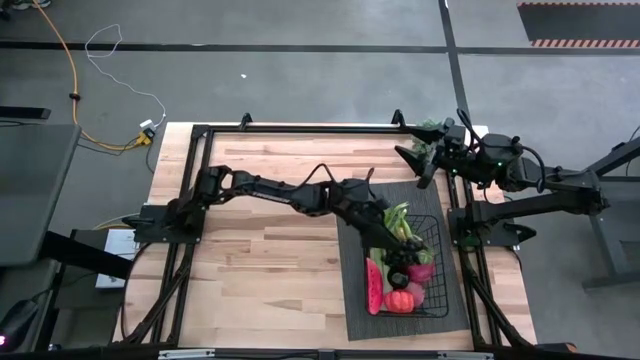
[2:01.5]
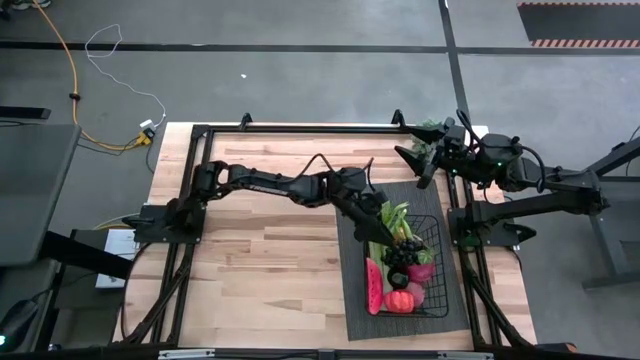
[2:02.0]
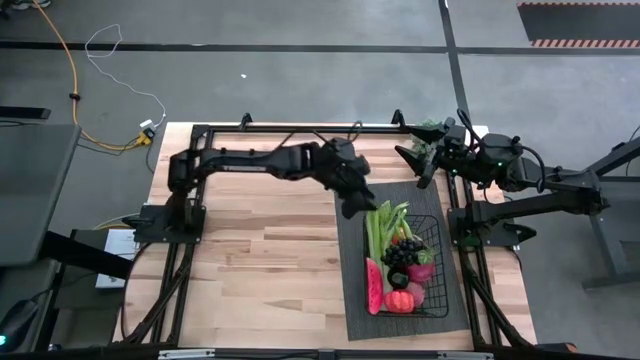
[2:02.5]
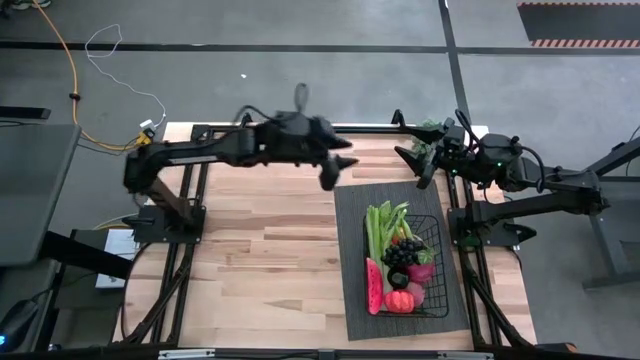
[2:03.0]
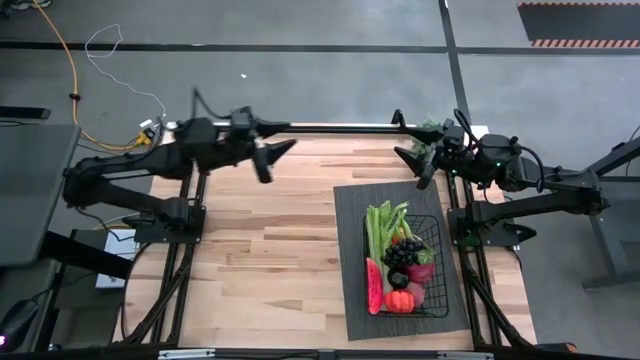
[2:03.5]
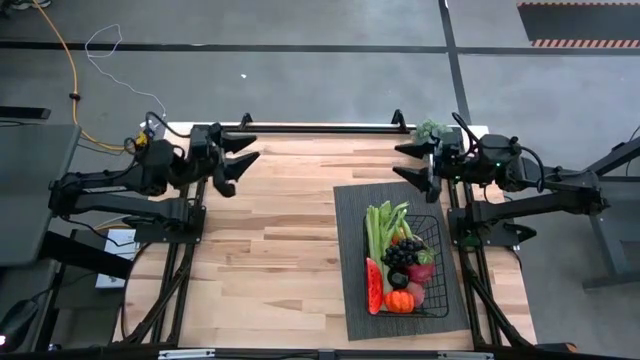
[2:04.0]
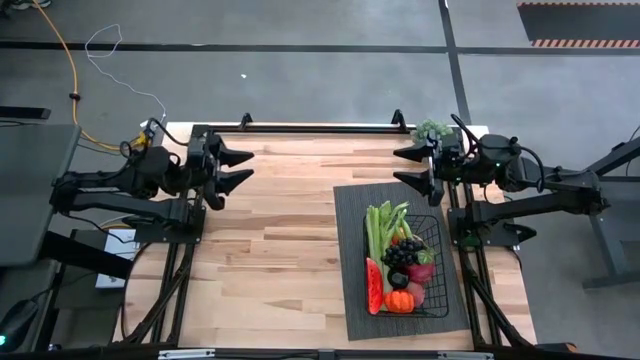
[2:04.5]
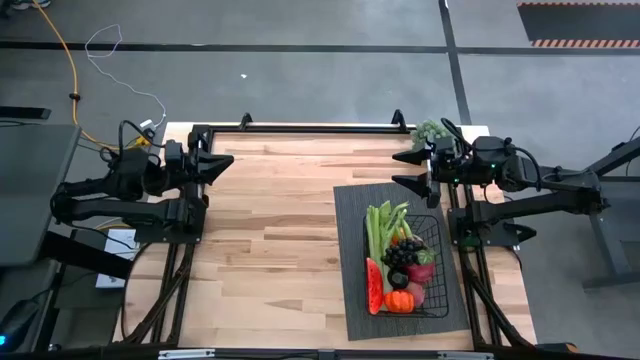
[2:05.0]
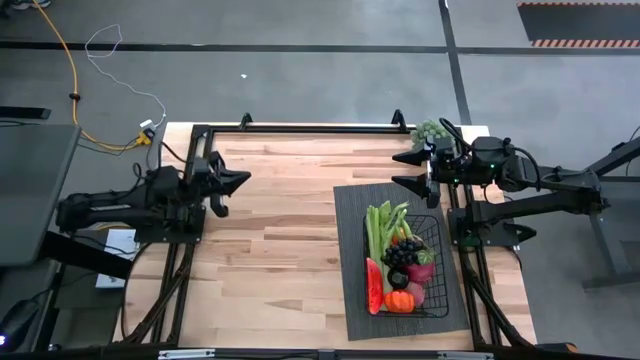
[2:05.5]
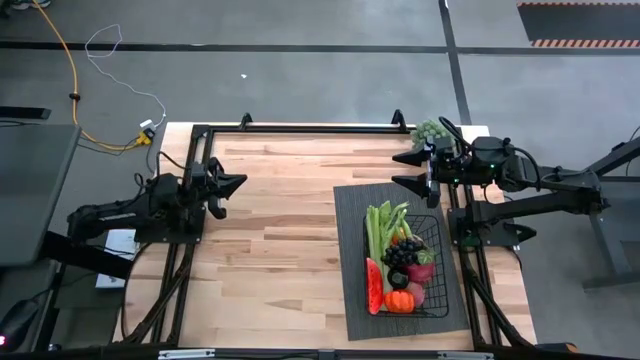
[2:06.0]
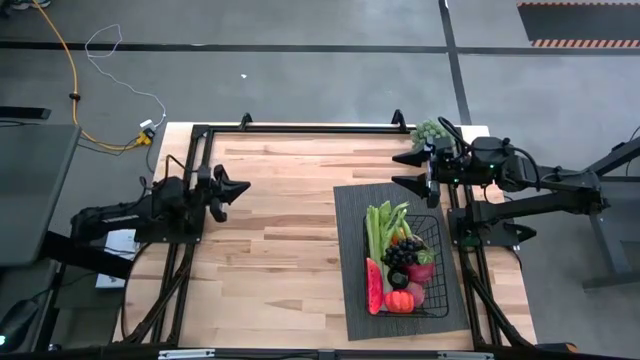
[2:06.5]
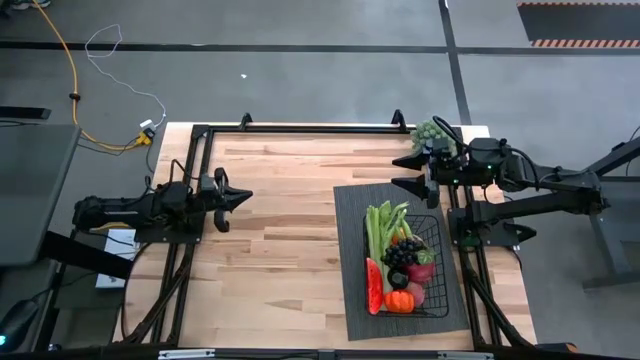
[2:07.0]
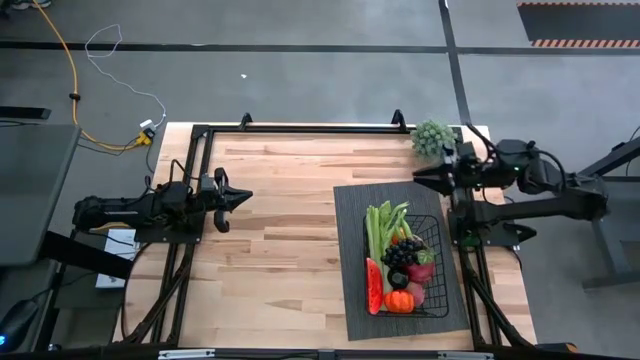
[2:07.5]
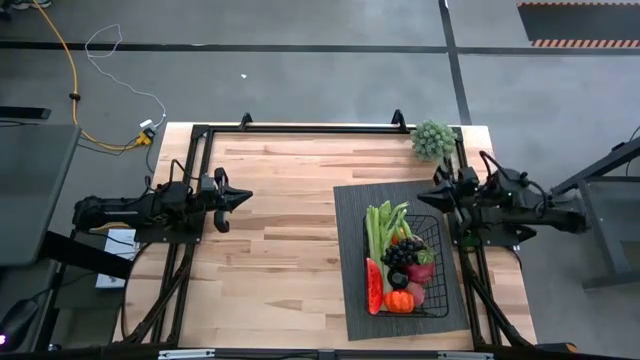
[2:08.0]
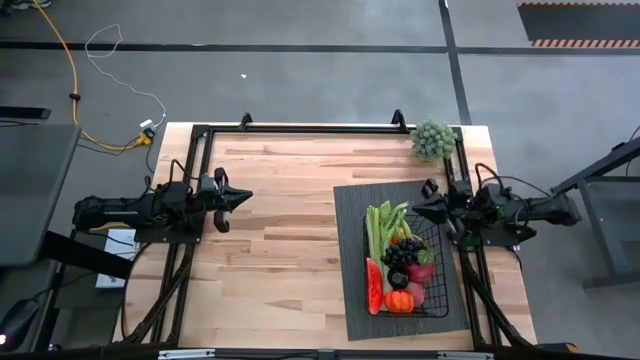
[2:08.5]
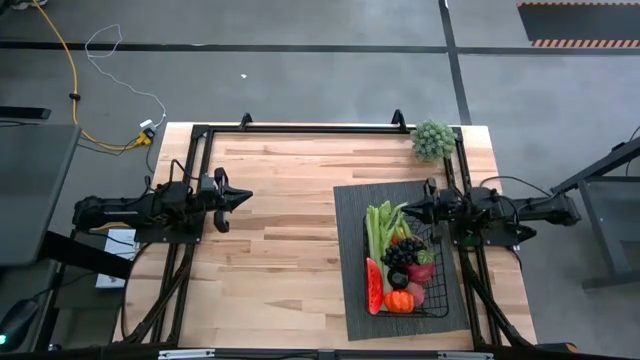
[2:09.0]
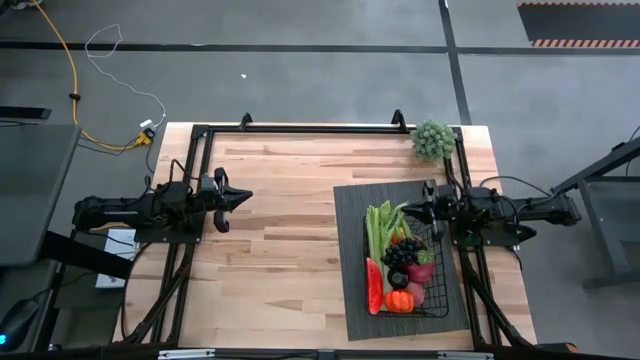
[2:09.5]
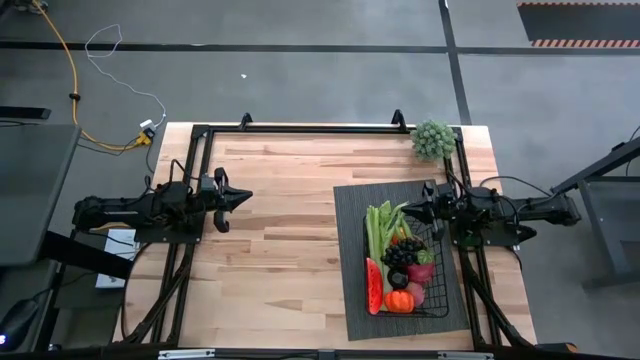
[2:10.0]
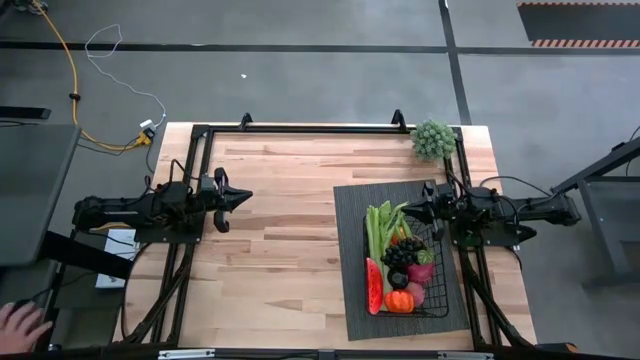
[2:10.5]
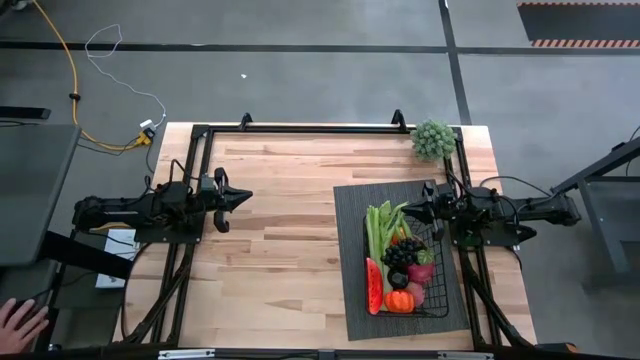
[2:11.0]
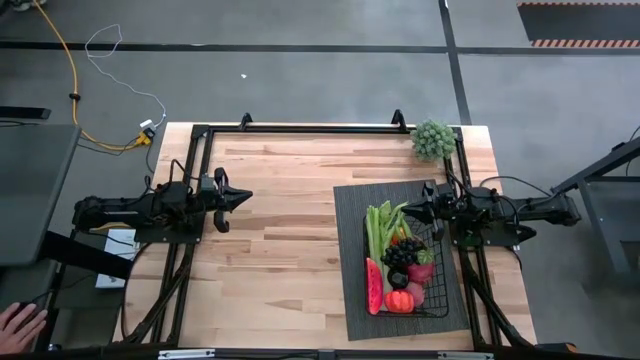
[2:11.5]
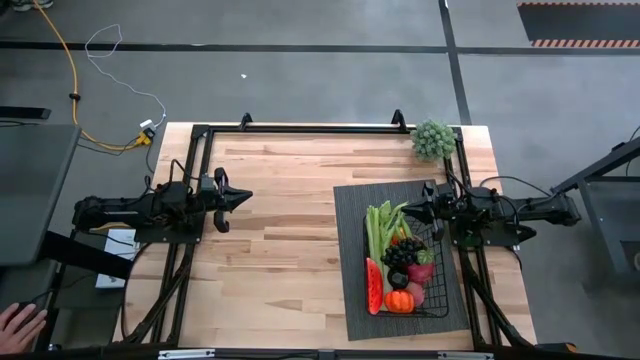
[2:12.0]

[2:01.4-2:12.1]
Task: Build produce basket
Return to Home Position

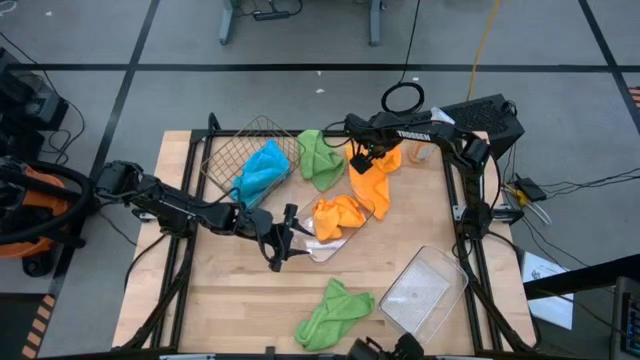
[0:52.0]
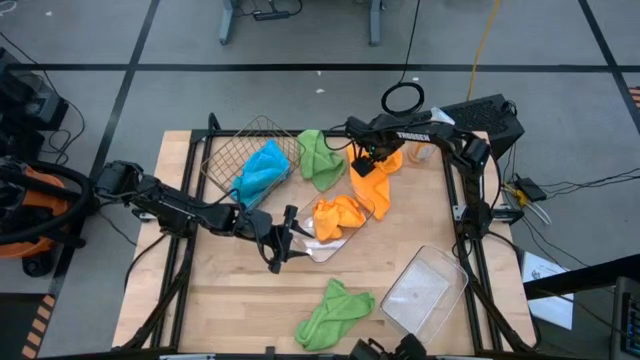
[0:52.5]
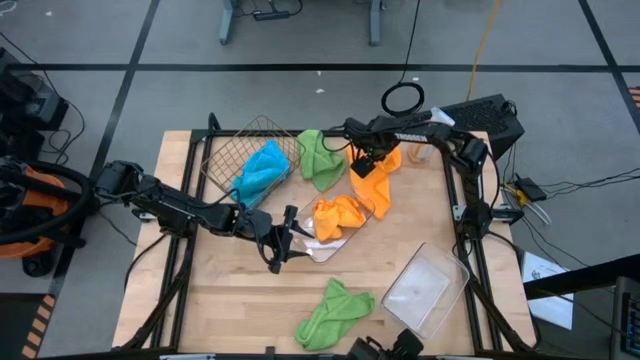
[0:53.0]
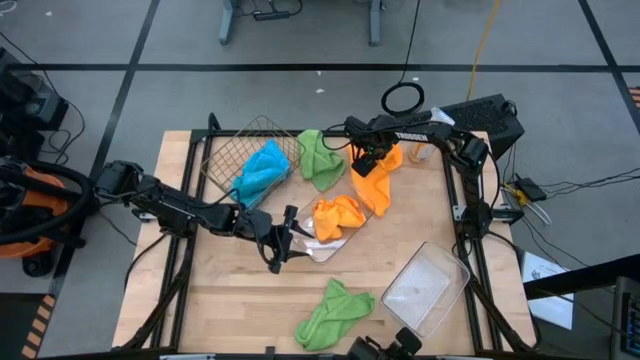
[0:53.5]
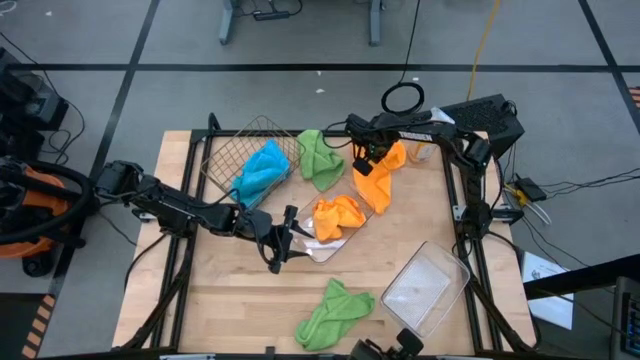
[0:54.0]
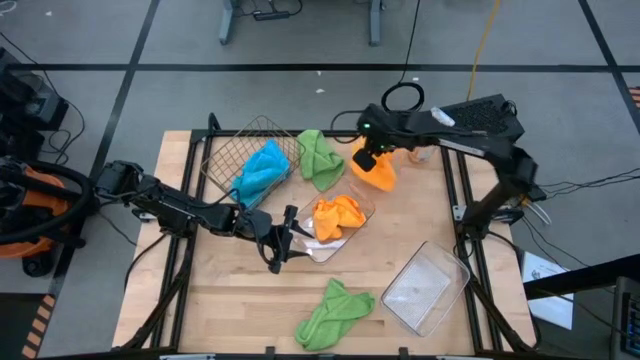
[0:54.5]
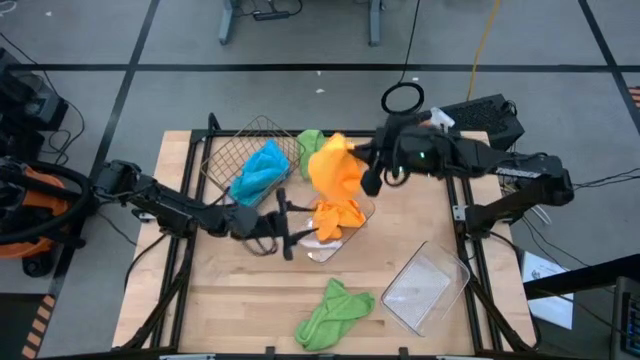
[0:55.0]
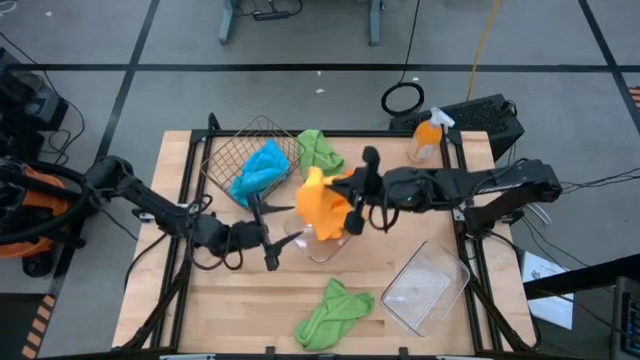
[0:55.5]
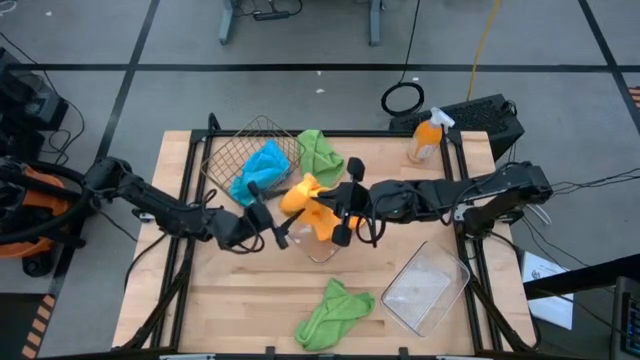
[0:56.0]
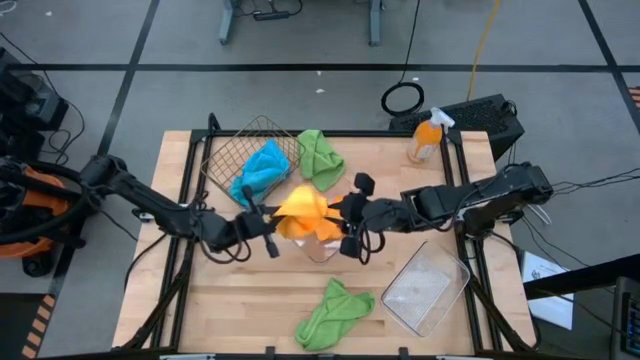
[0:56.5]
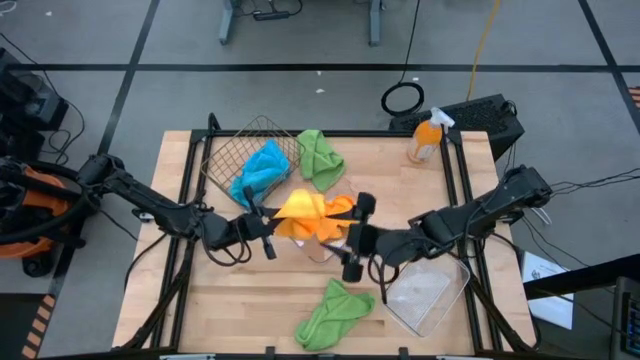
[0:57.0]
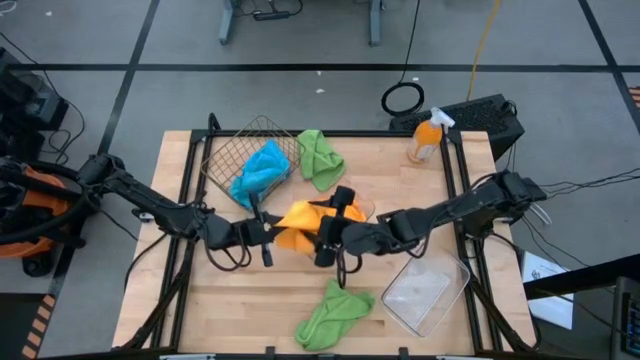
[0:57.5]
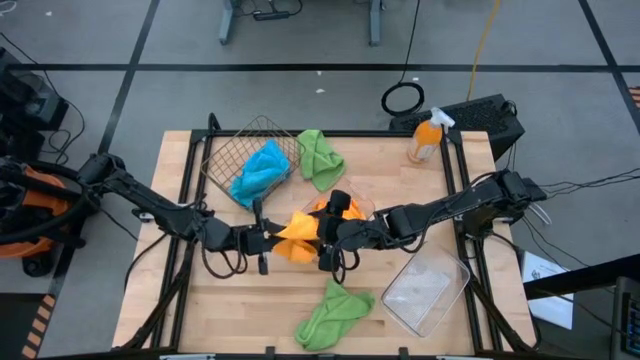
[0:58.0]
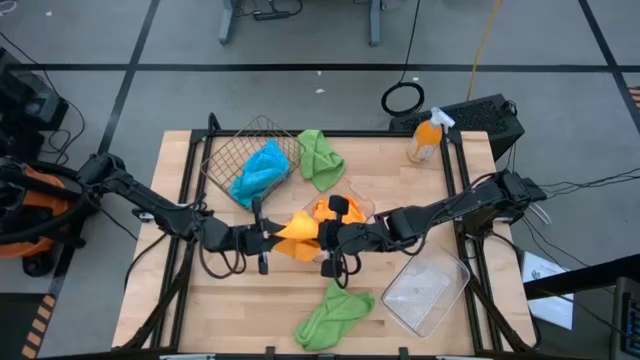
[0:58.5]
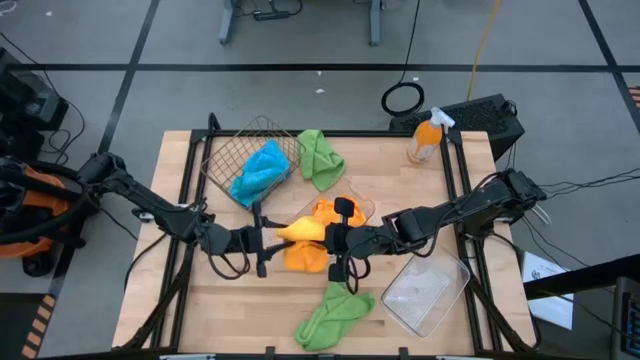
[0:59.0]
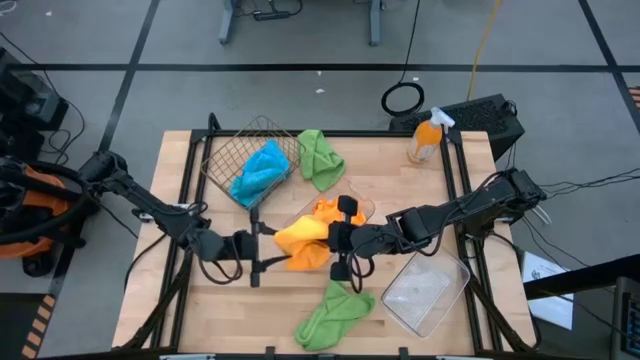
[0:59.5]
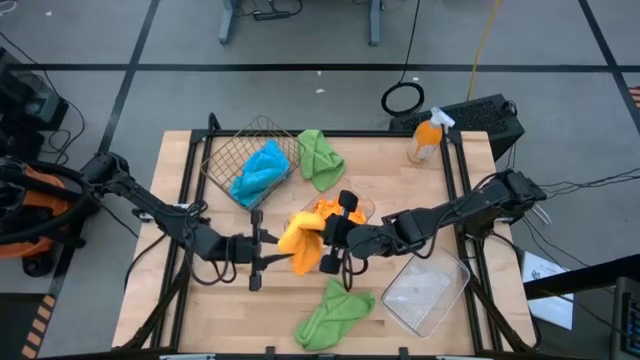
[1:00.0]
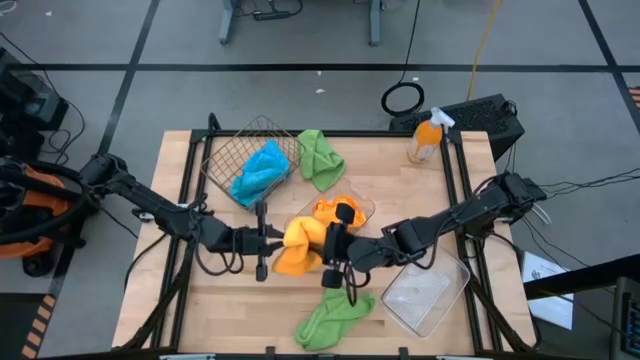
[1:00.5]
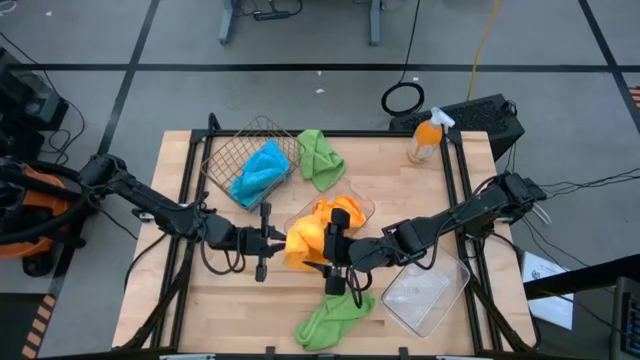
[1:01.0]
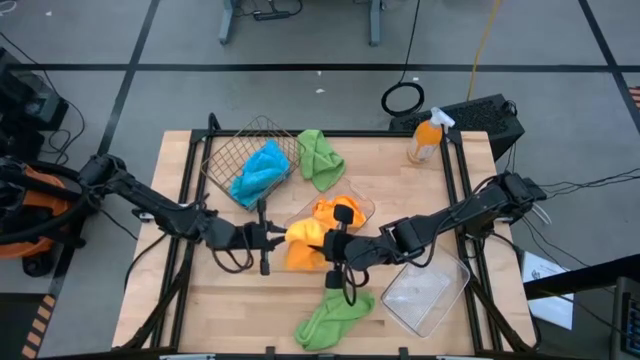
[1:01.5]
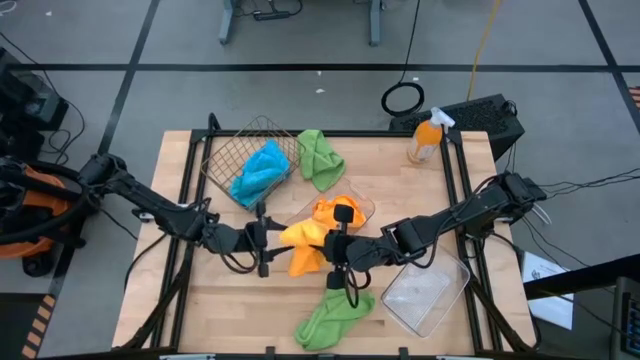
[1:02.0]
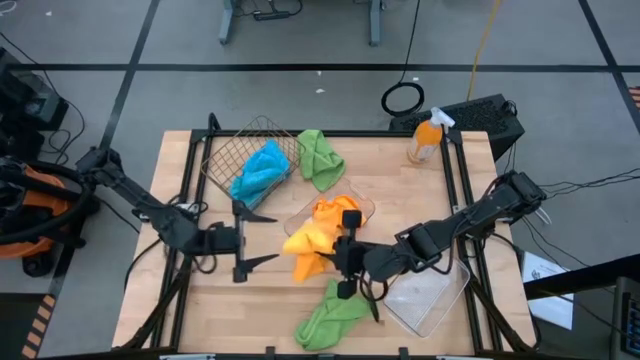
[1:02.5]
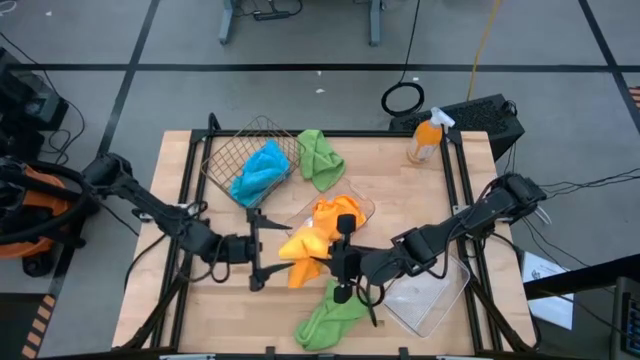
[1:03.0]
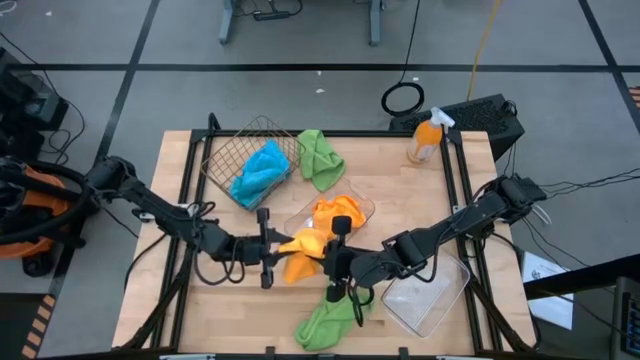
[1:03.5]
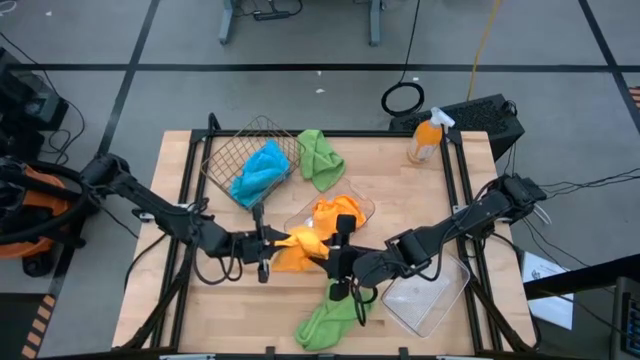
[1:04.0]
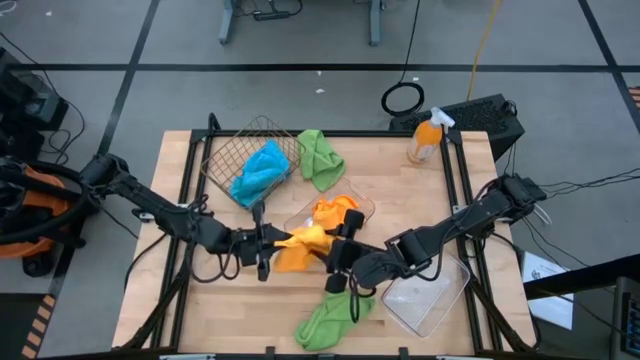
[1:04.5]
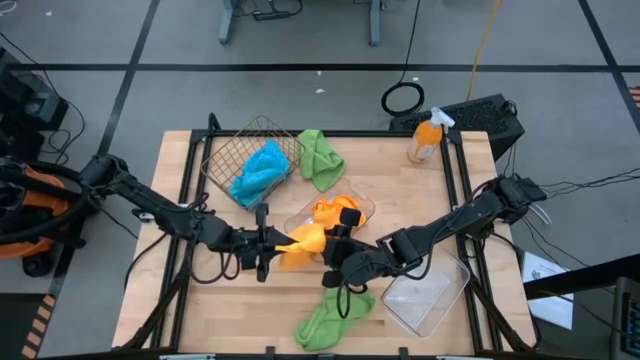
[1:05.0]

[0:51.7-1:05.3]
Task: Sort microfiber towel by color & place in baskets
Put the yellow towel into the top transparent bin
